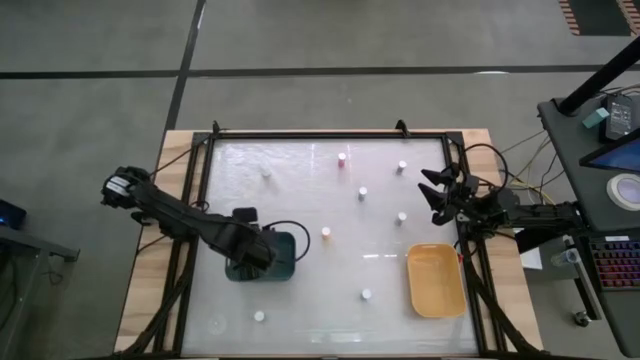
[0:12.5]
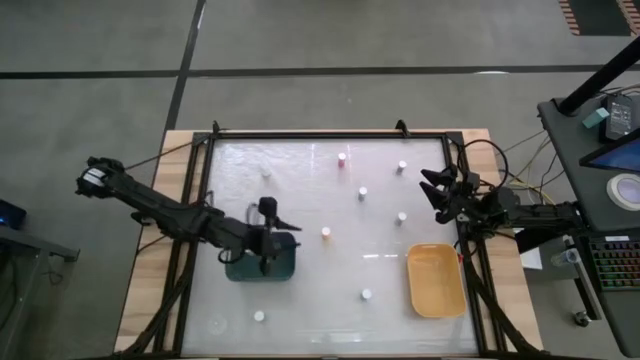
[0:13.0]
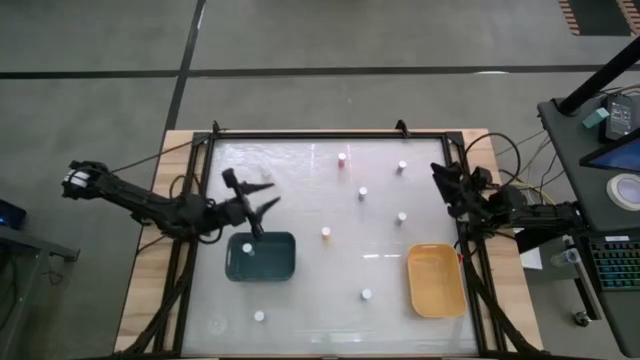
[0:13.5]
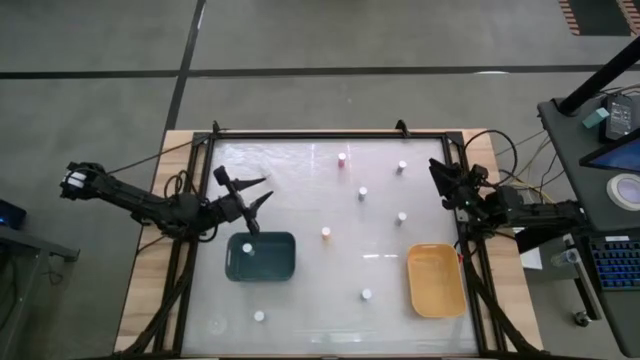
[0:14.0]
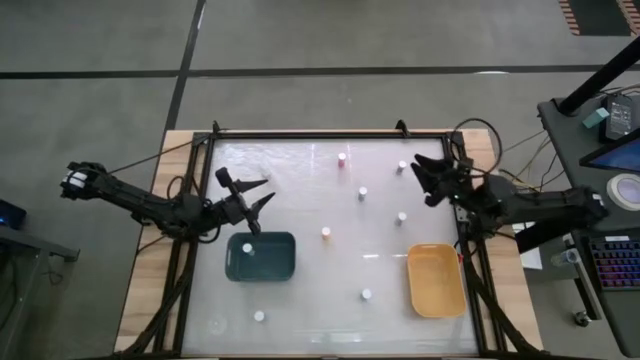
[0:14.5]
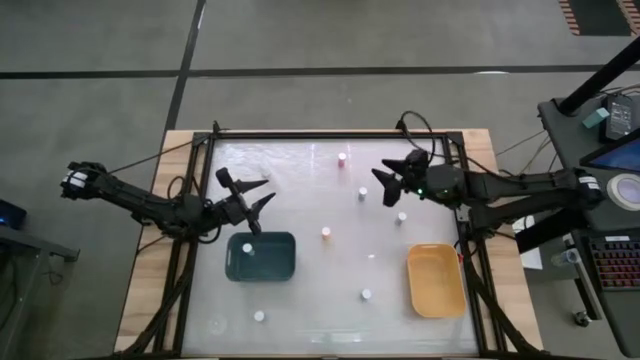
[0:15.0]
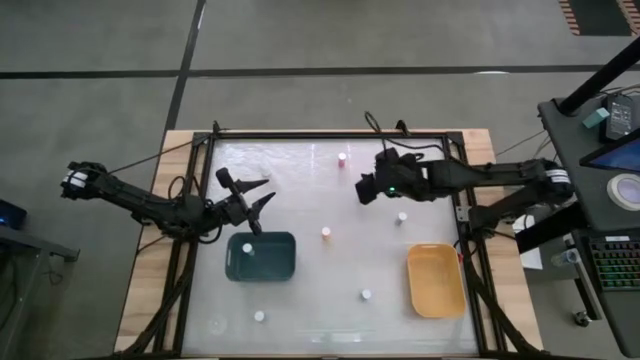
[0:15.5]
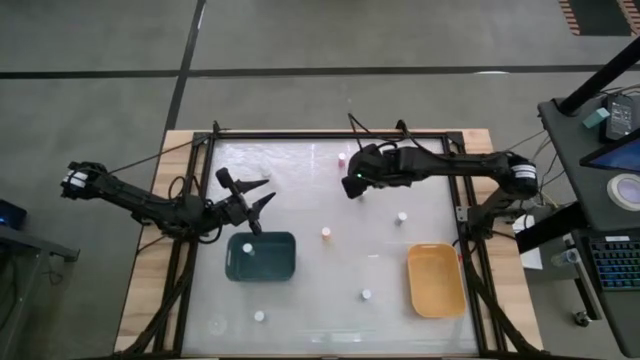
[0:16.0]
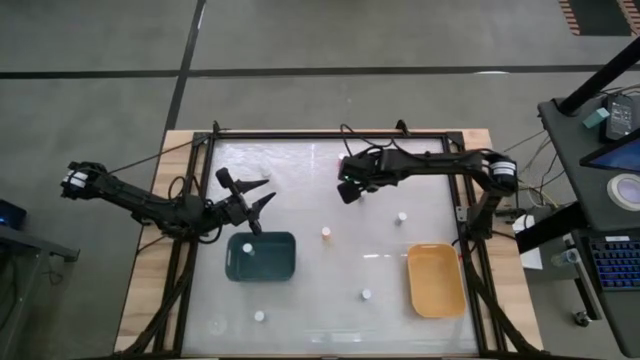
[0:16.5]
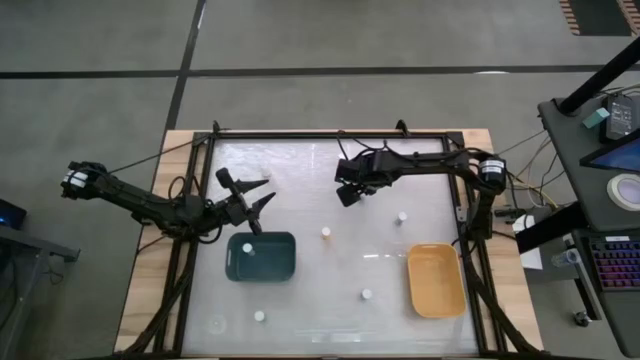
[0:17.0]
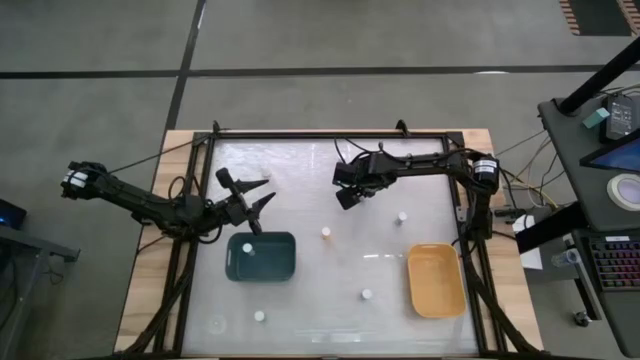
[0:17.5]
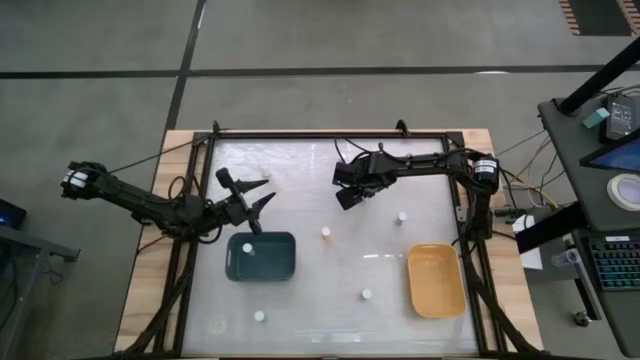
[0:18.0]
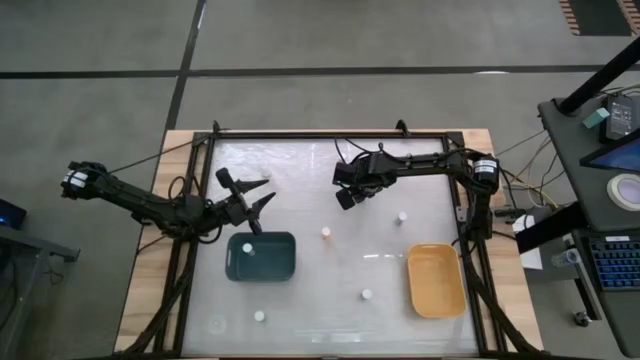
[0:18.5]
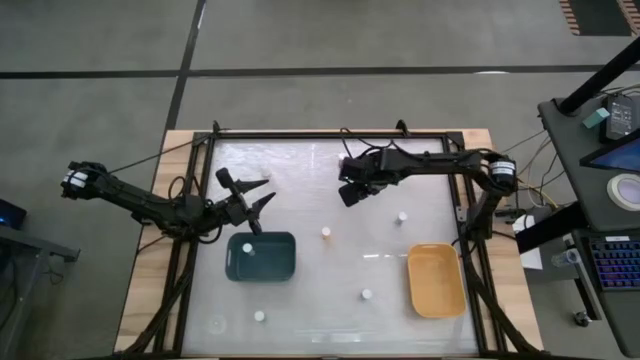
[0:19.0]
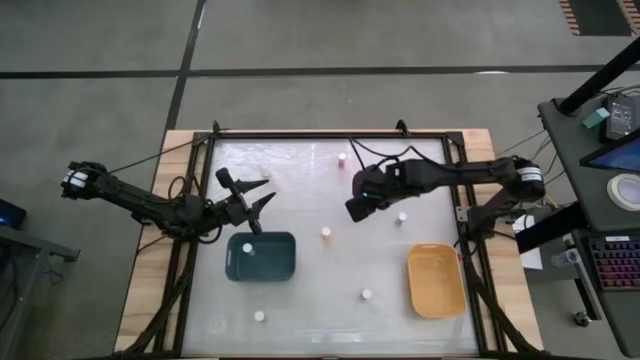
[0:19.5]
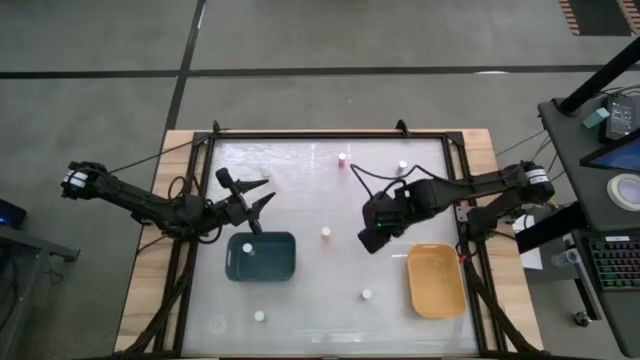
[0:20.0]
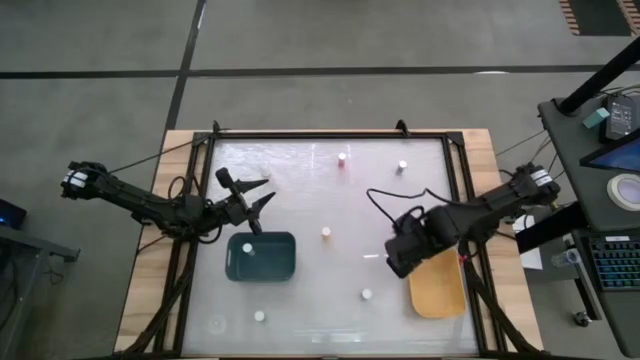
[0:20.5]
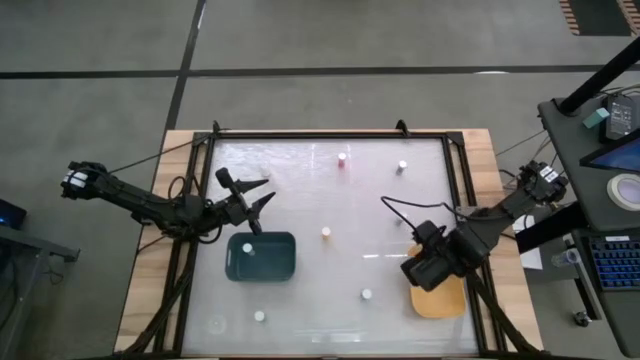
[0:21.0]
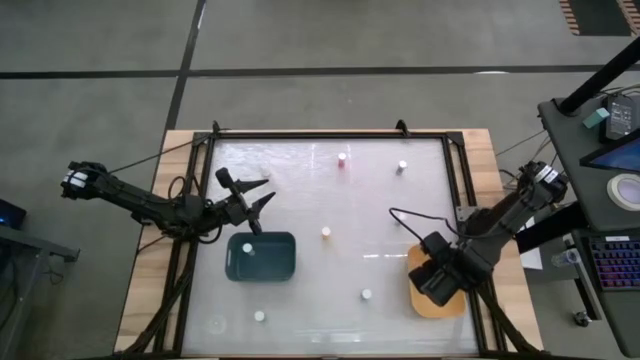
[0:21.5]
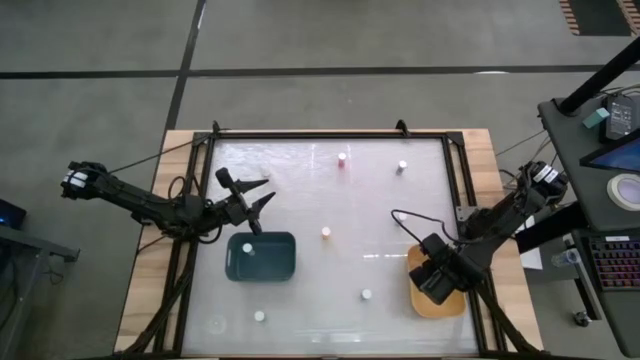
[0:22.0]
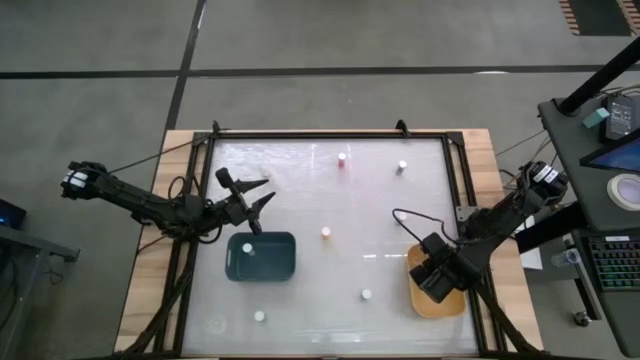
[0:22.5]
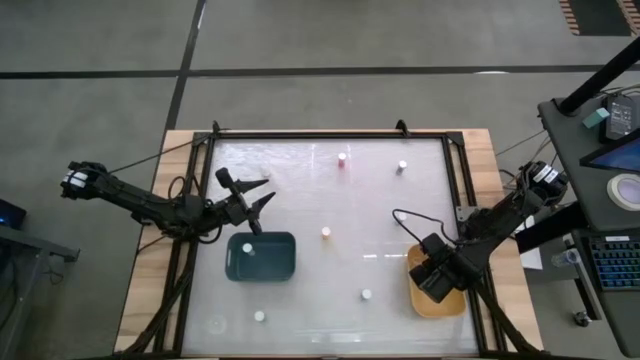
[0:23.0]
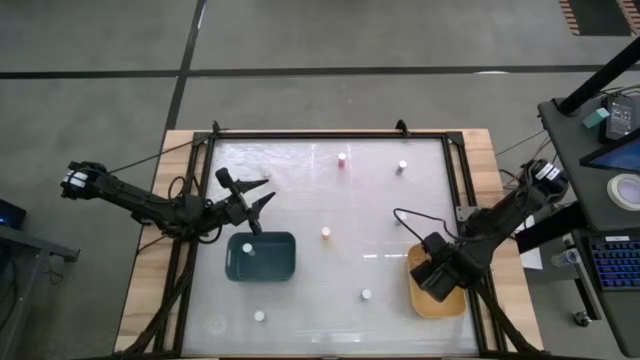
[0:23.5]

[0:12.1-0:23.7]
Task: Pick and place medicine bottles into bin by pill shape (circle, oval)
Put the blue bottled capsules into the yellow bin

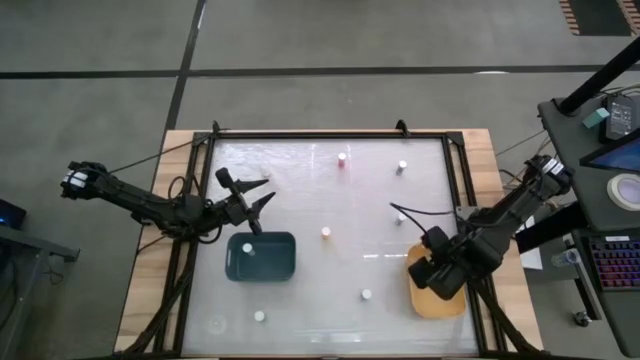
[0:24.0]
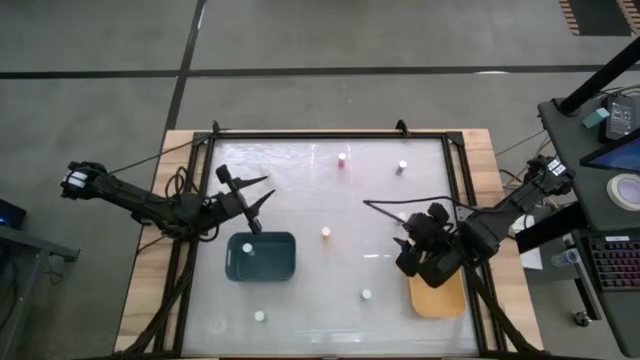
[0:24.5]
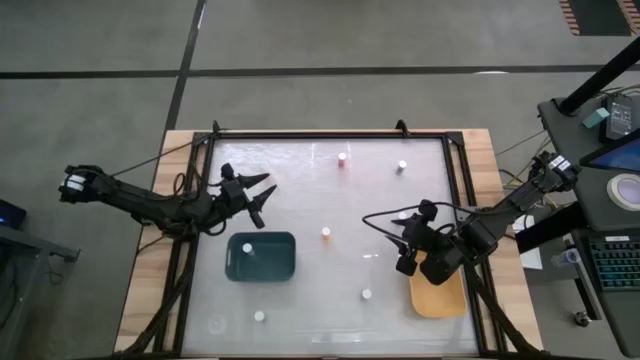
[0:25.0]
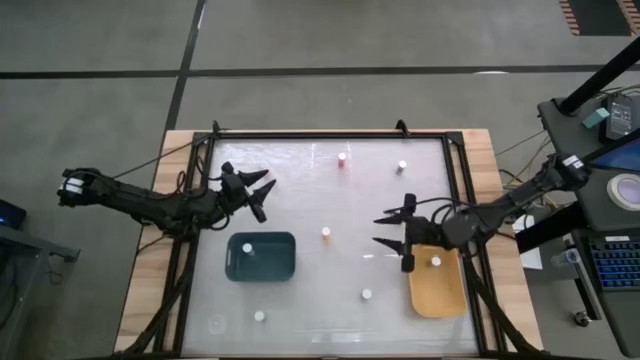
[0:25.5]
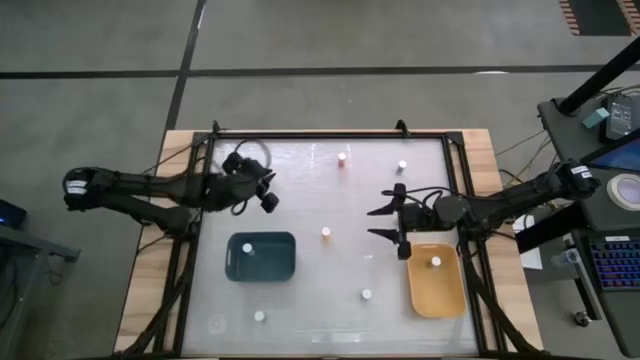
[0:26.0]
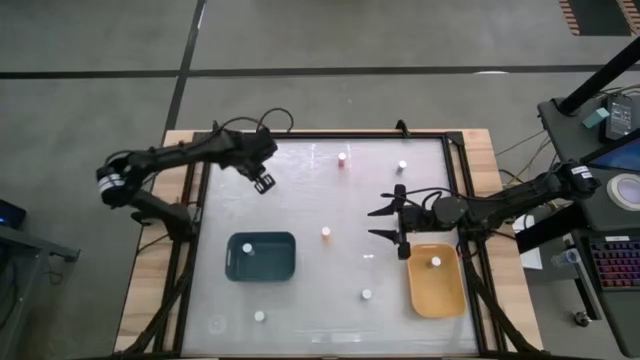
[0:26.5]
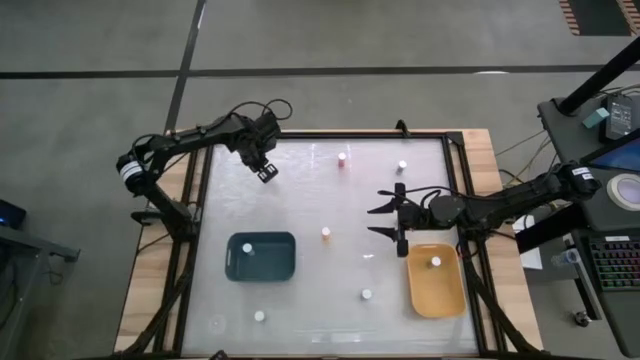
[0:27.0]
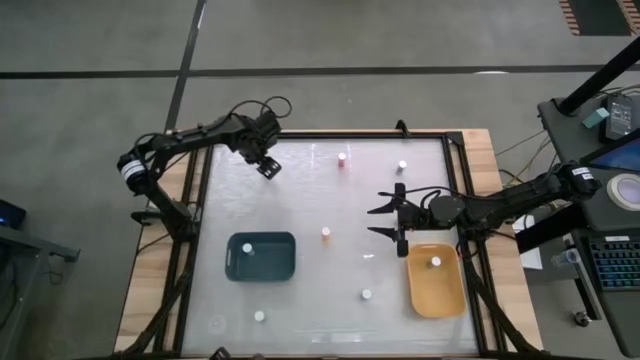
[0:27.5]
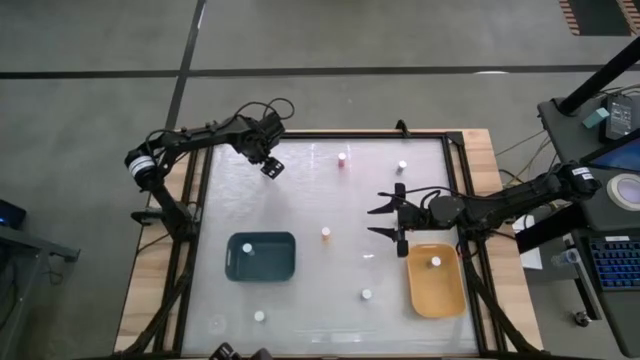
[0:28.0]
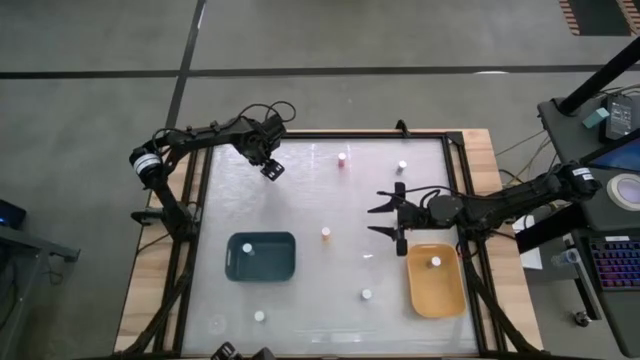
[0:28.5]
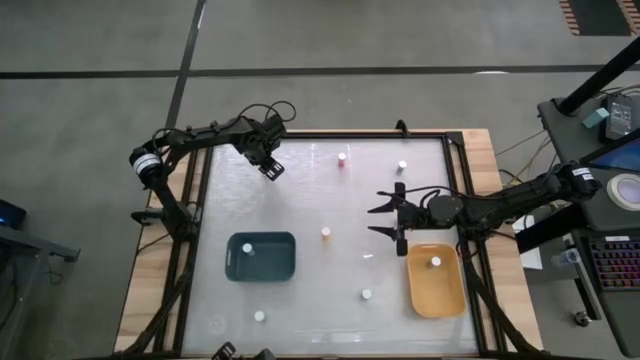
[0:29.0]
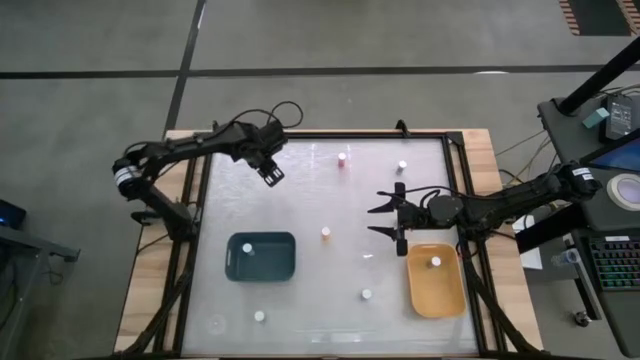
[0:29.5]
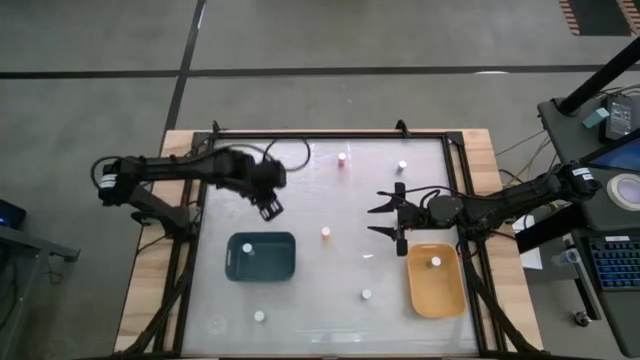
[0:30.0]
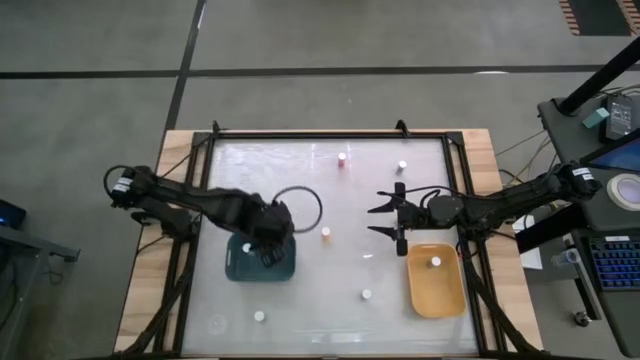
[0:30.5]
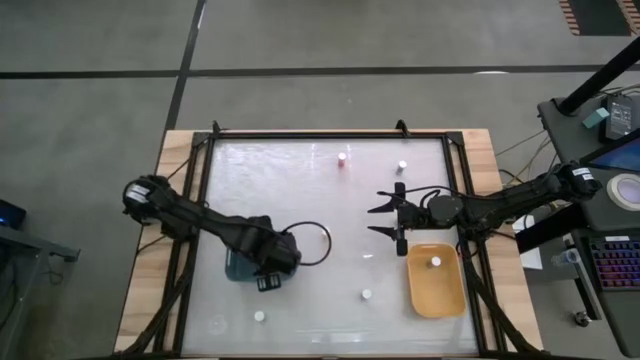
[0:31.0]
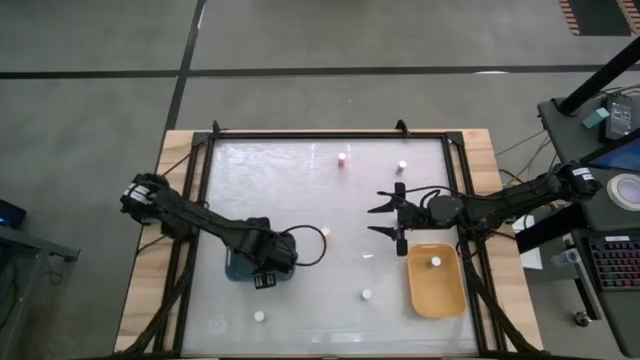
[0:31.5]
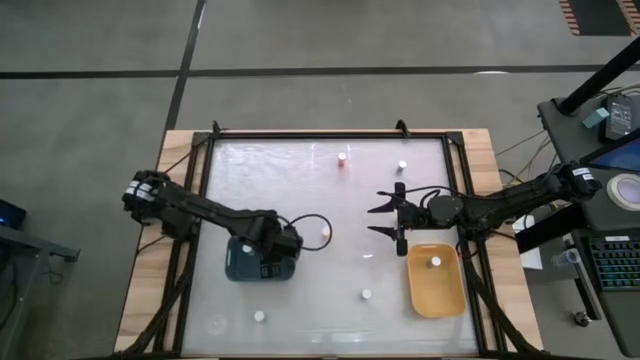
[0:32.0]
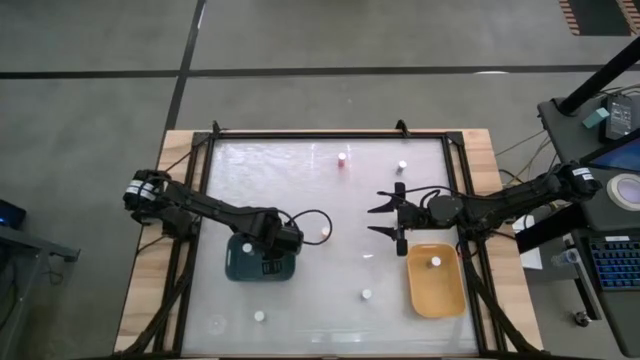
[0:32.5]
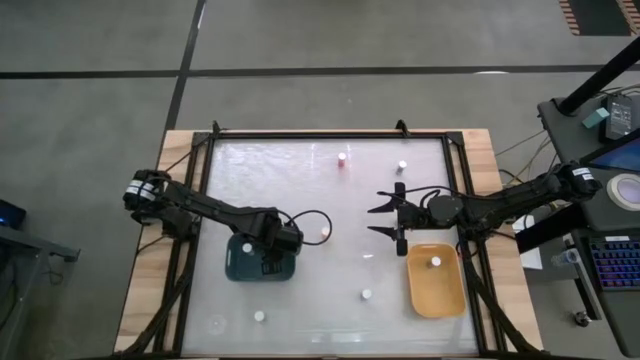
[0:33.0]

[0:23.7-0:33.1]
Put the white bottled tablets into the green bin
